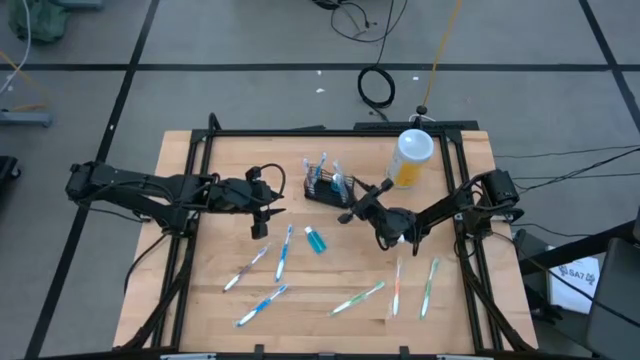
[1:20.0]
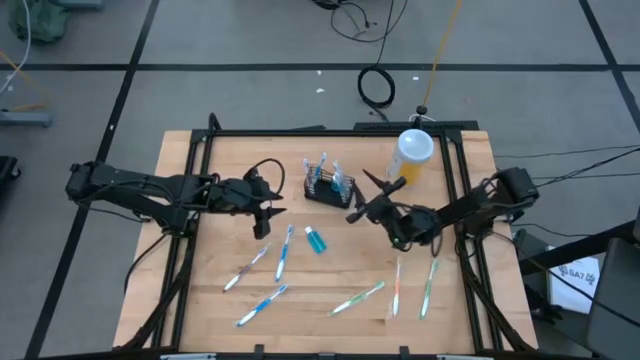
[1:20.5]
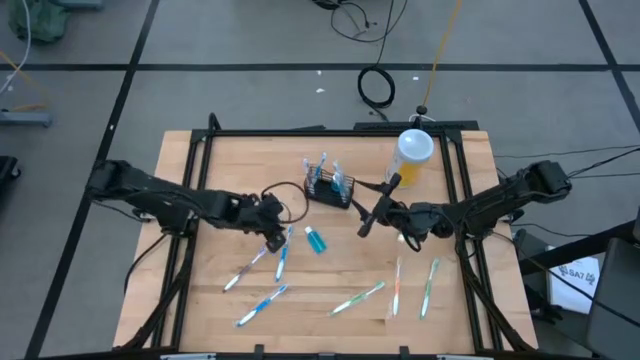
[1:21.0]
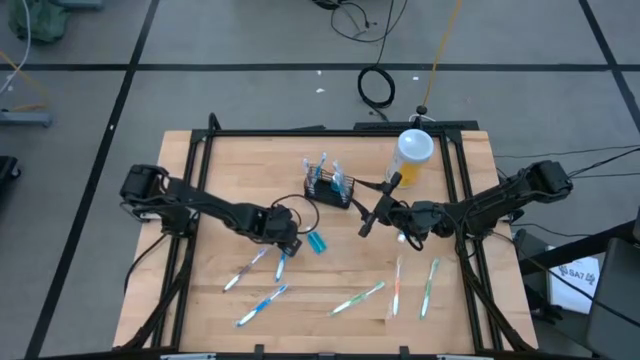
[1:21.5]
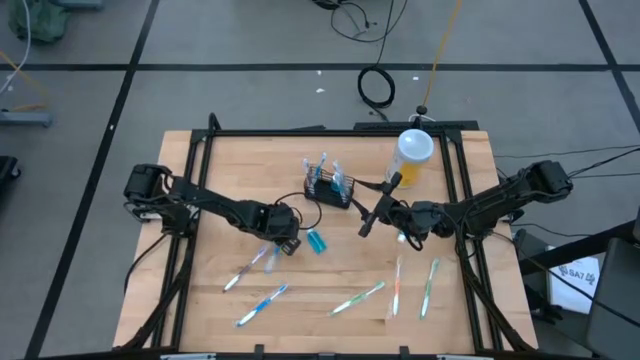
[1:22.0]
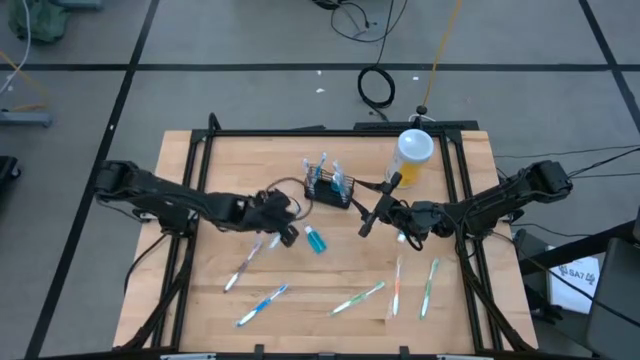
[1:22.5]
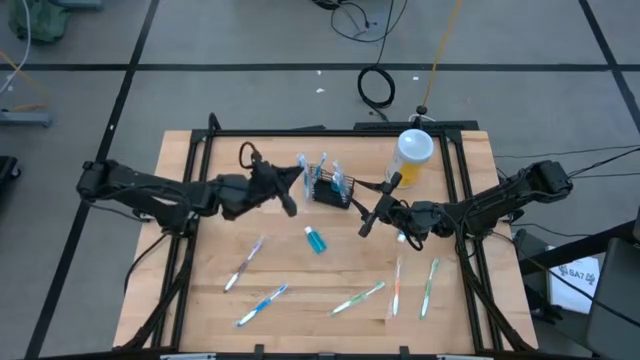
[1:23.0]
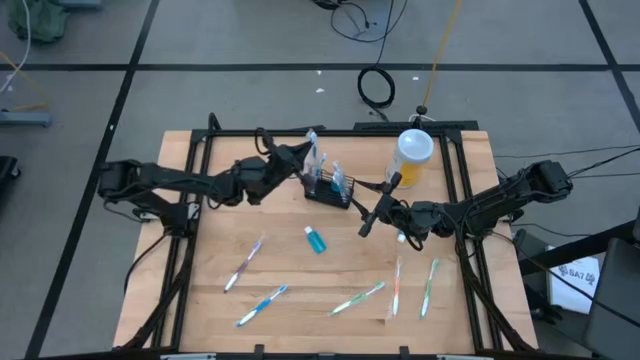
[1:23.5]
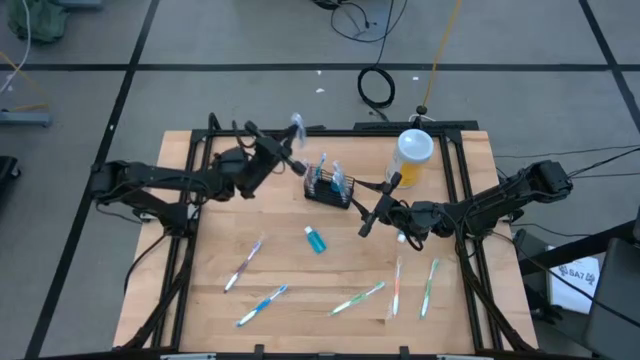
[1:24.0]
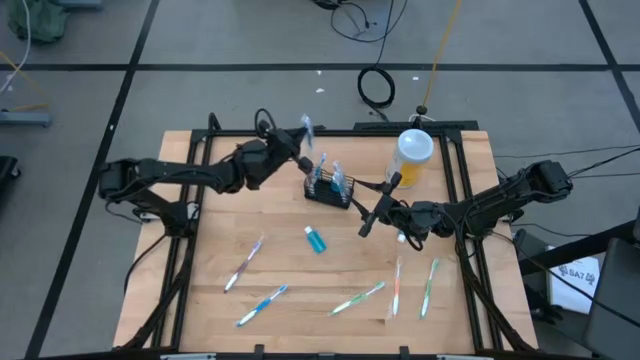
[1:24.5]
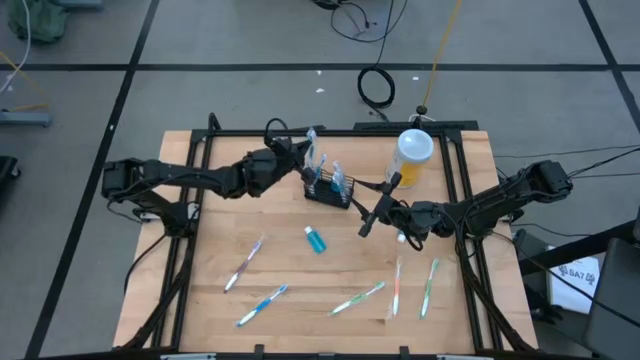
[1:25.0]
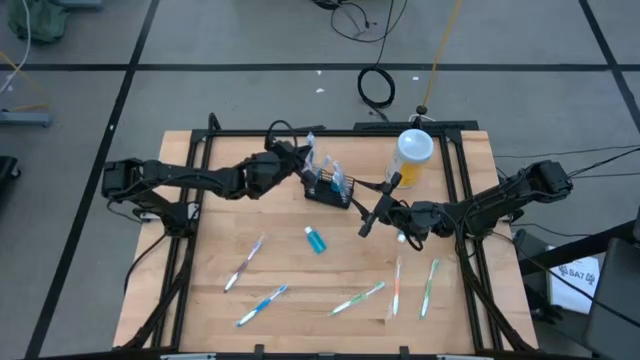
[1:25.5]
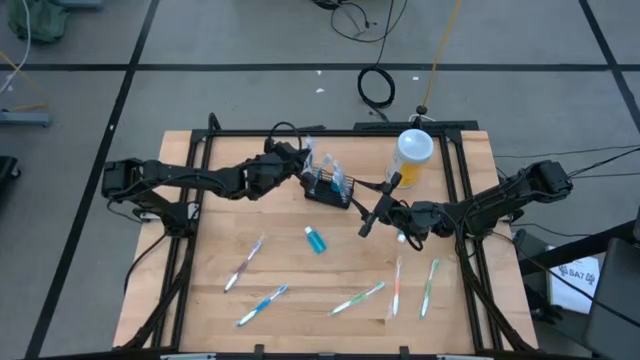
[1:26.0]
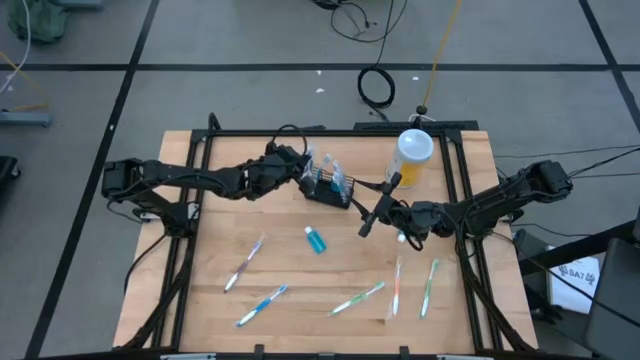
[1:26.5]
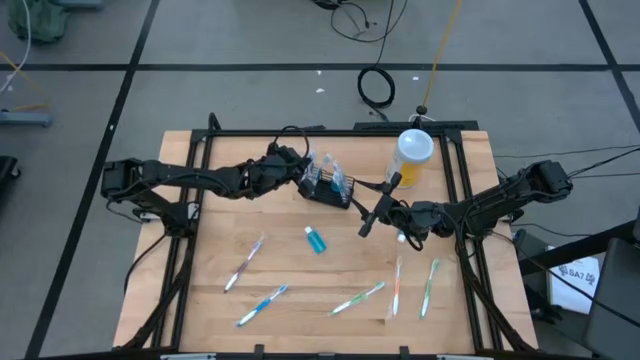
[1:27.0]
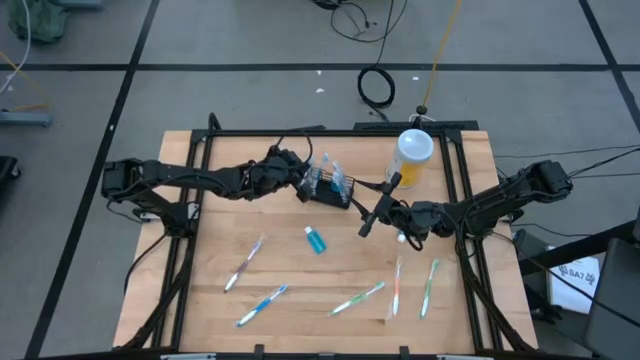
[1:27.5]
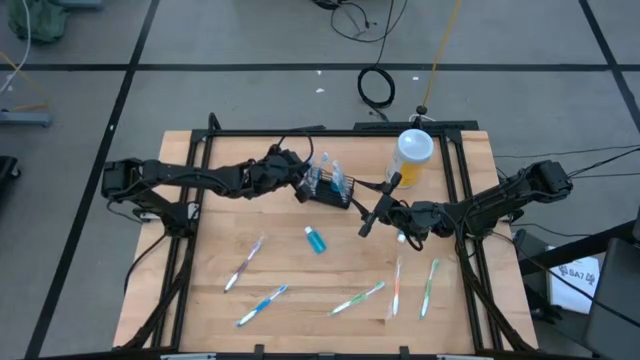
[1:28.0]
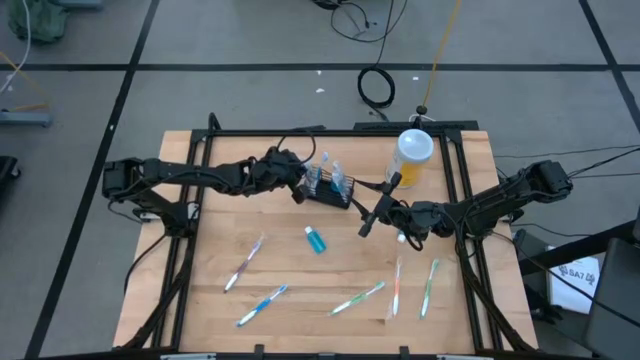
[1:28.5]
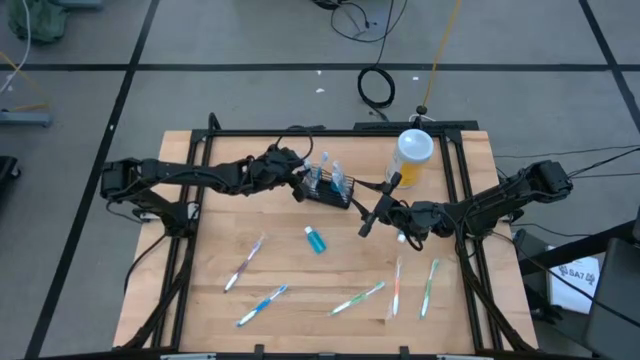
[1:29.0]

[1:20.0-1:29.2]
Task: Pick & Place toothbrushing station
Put the blue toothbrush into the black wire organizer

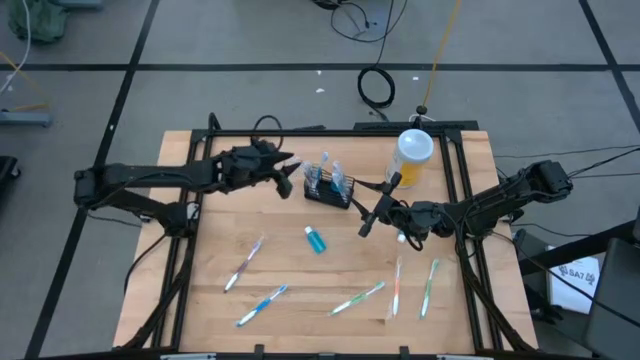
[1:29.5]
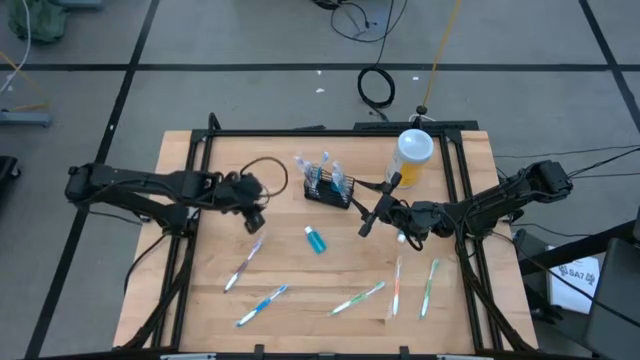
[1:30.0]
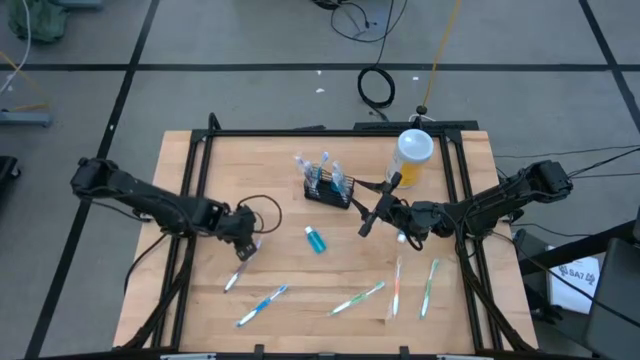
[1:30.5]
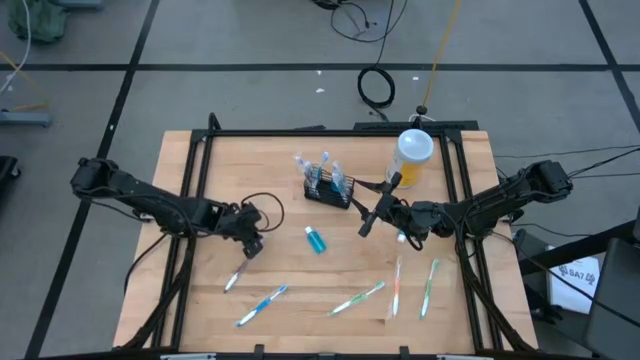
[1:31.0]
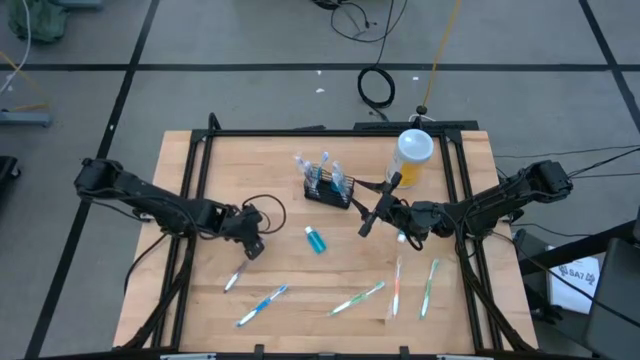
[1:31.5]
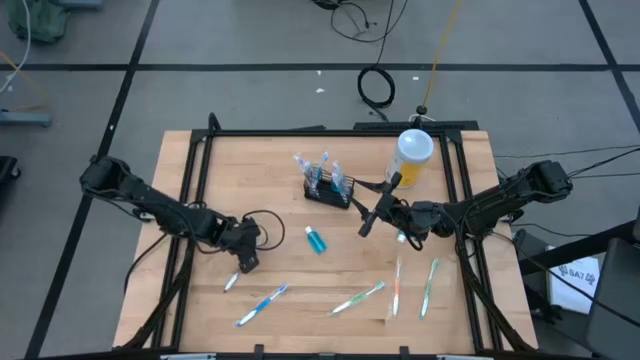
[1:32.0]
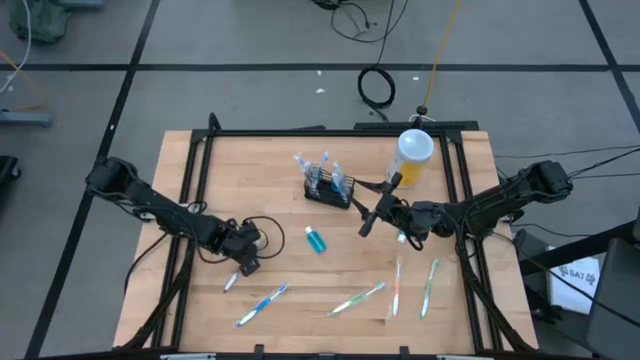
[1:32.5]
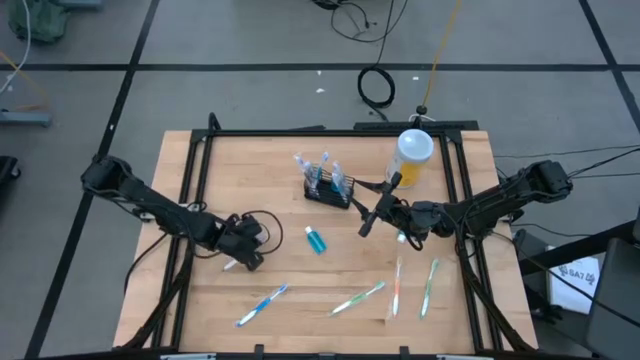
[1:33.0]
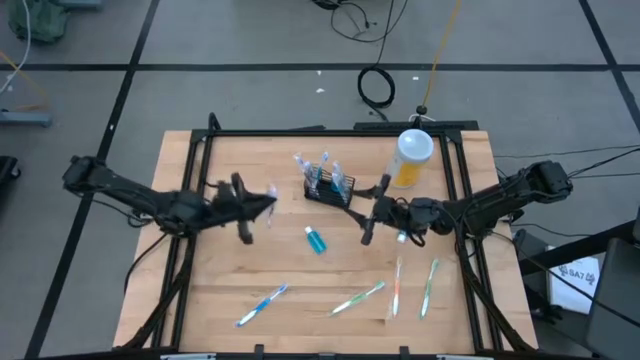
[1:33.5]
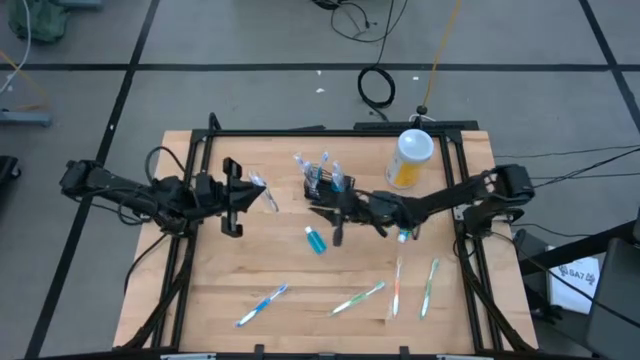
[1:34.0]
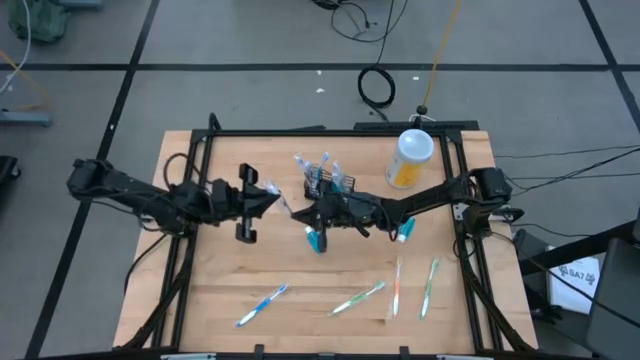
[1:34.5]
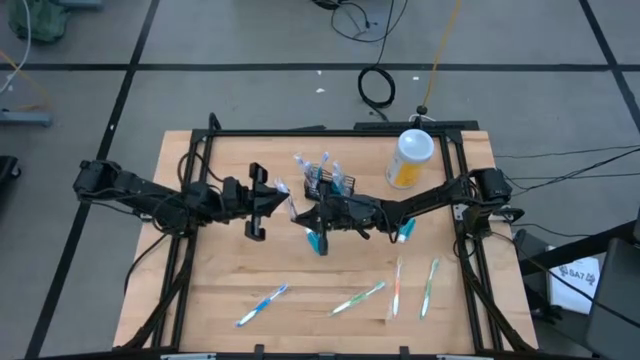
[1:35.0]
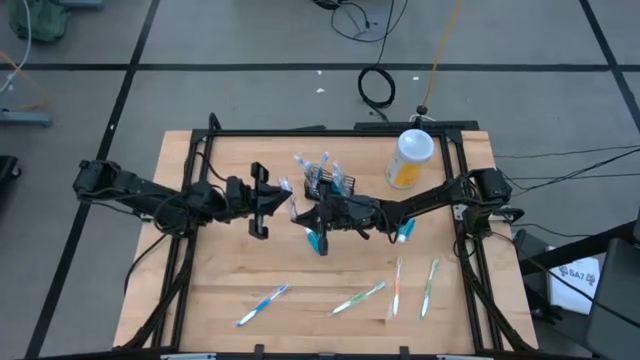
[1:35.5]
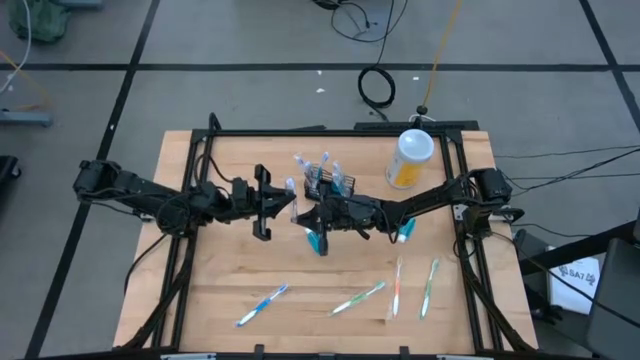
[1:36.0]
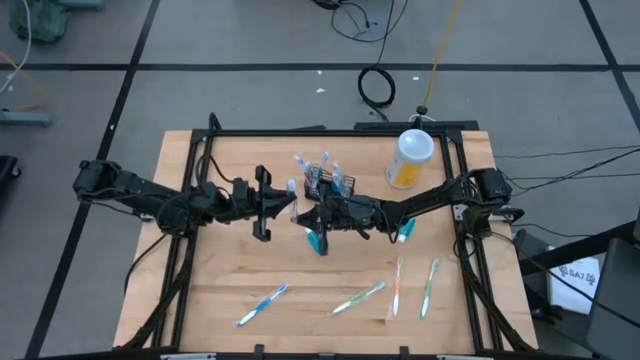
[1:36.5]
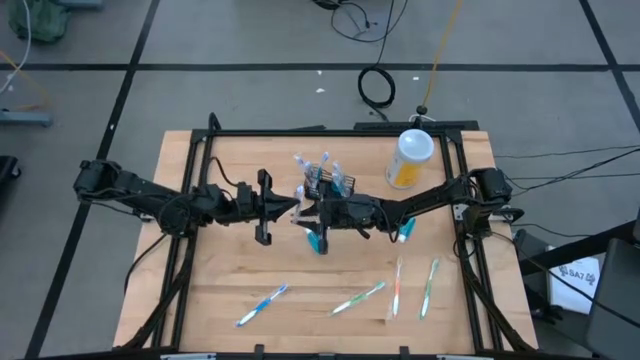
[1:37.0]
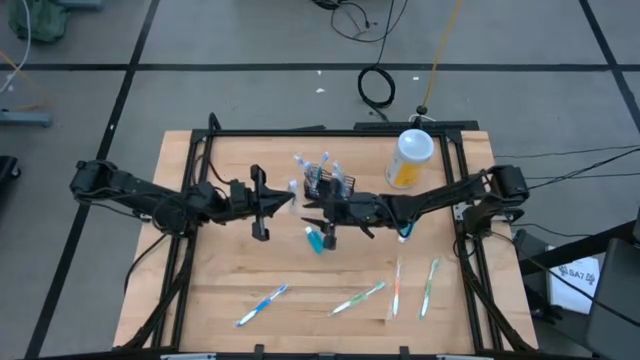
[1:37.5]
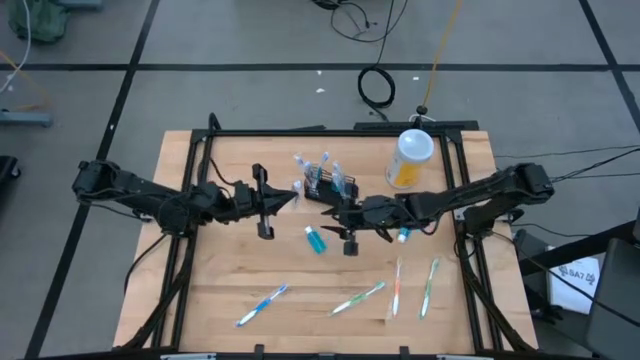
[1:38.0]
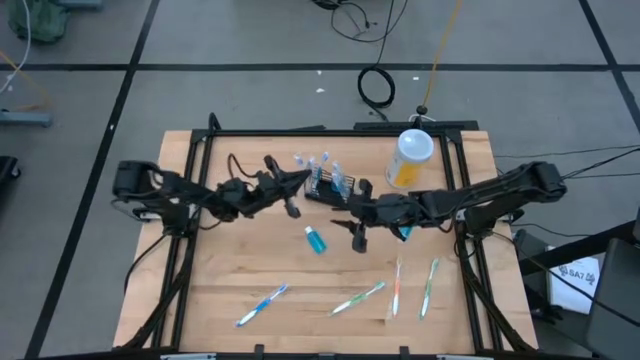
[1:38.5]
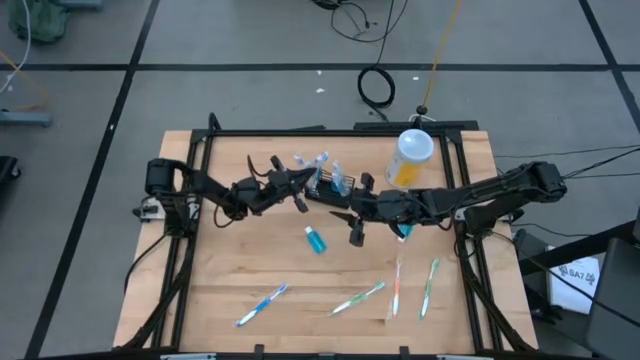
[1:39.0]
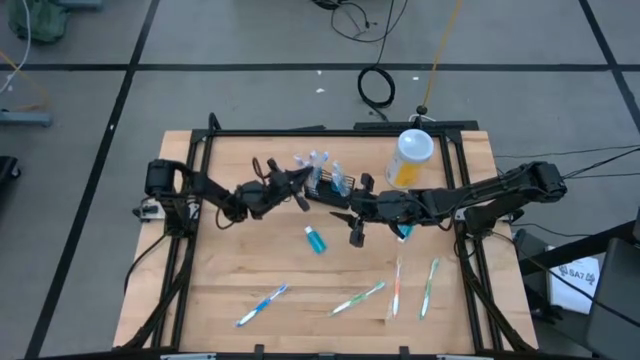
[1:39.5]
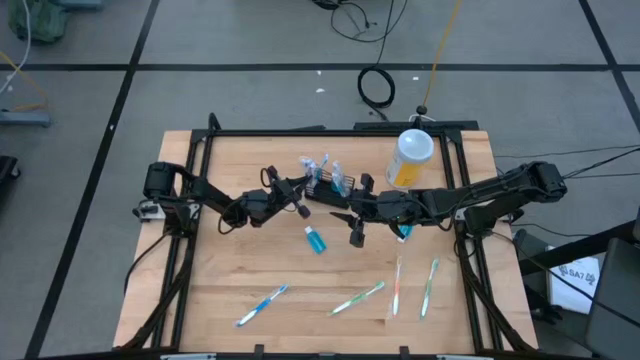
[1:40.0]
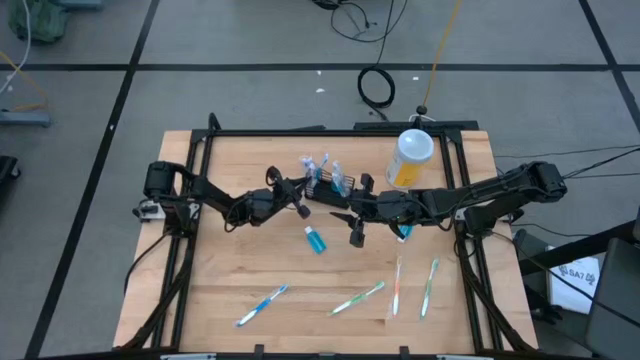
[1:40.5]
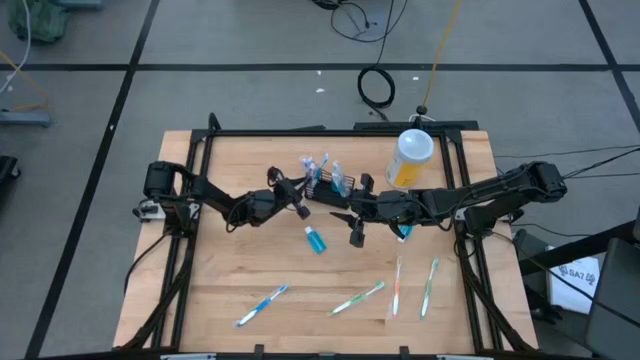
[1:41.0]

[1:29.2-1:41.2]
Put the purple toothbrush into the black wire organizer
